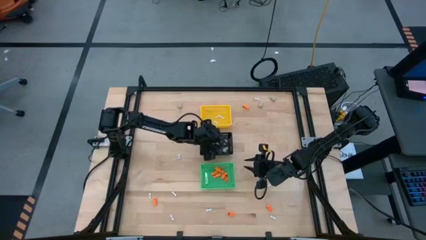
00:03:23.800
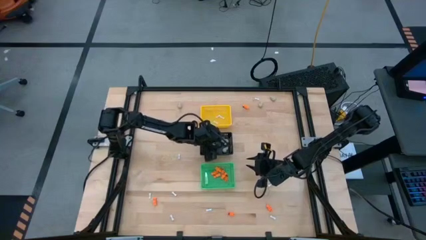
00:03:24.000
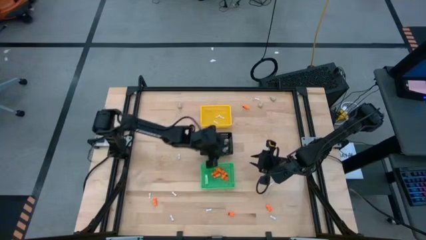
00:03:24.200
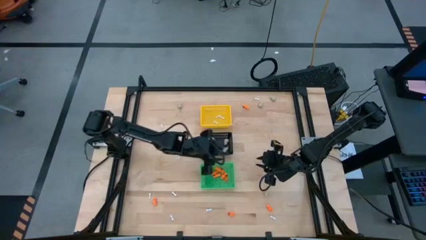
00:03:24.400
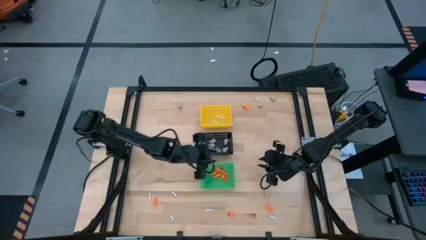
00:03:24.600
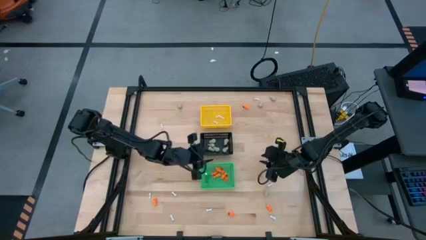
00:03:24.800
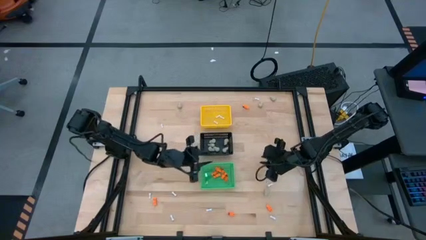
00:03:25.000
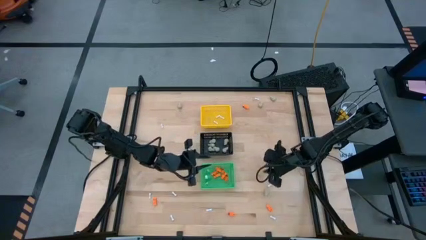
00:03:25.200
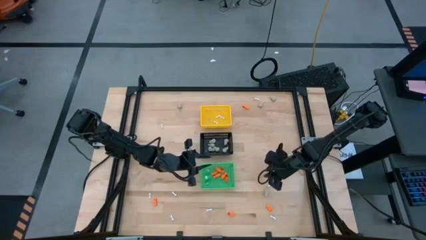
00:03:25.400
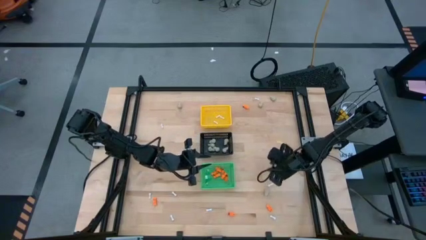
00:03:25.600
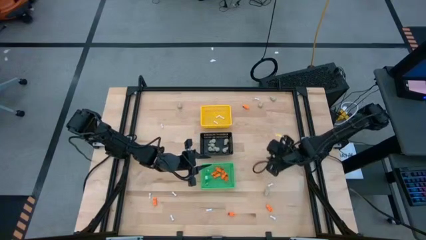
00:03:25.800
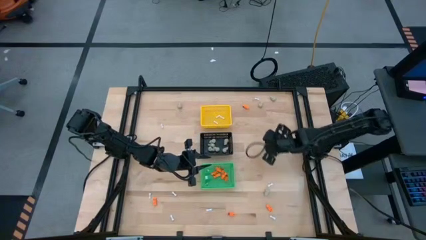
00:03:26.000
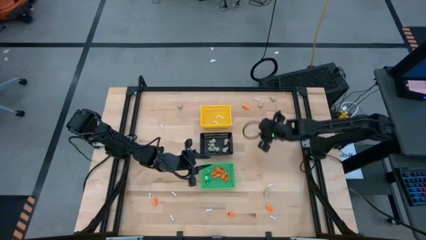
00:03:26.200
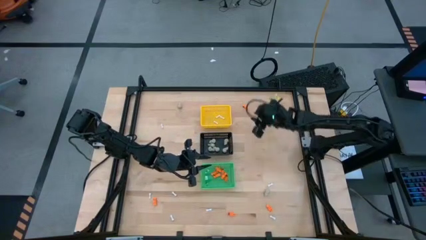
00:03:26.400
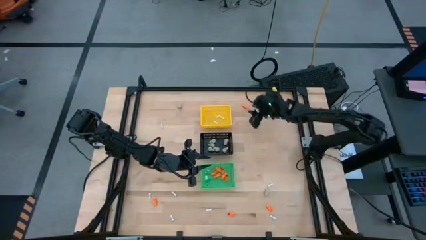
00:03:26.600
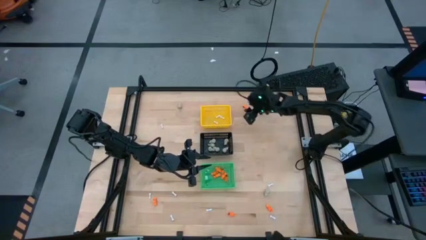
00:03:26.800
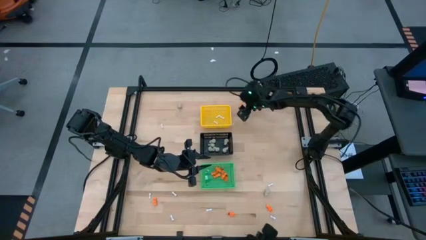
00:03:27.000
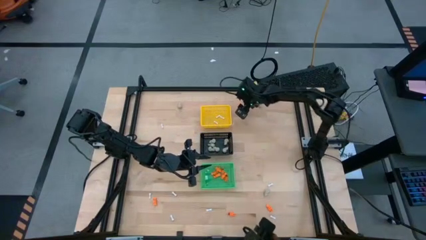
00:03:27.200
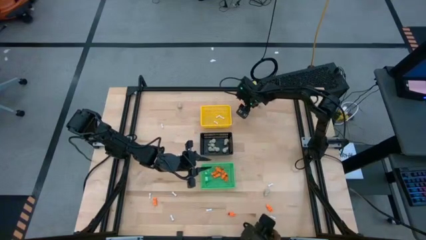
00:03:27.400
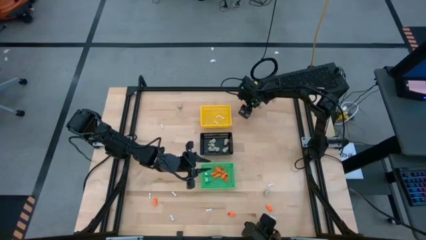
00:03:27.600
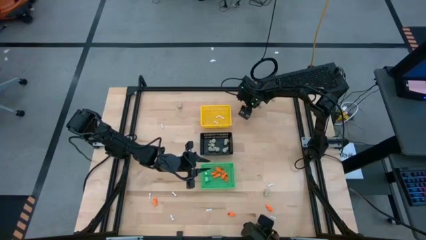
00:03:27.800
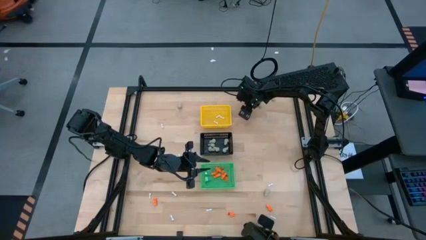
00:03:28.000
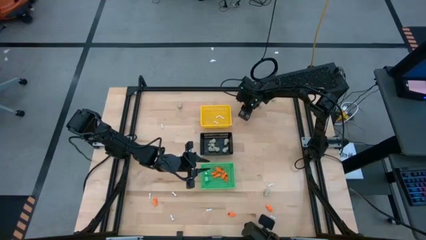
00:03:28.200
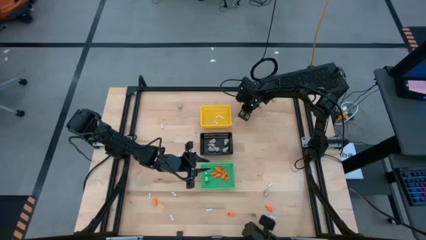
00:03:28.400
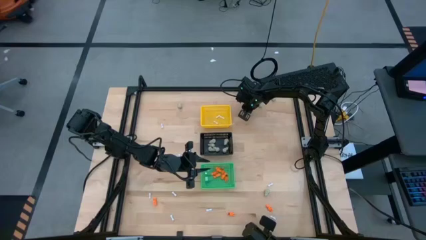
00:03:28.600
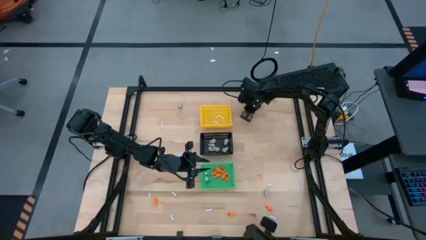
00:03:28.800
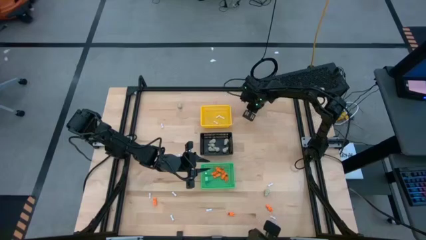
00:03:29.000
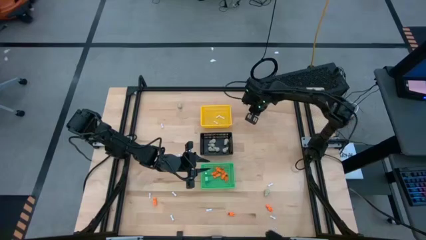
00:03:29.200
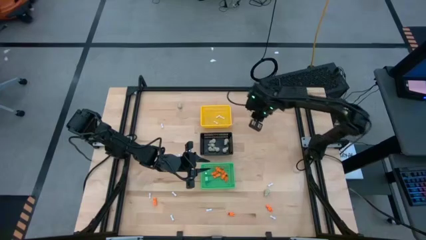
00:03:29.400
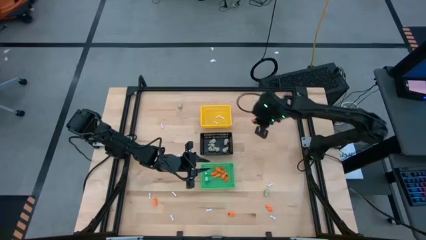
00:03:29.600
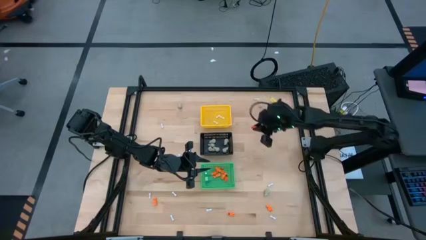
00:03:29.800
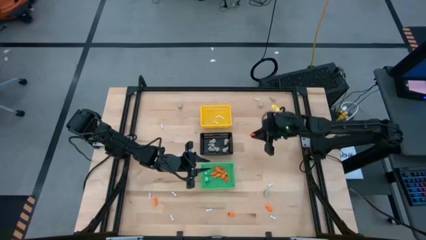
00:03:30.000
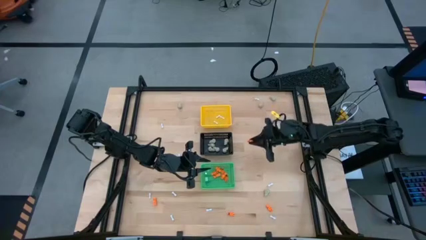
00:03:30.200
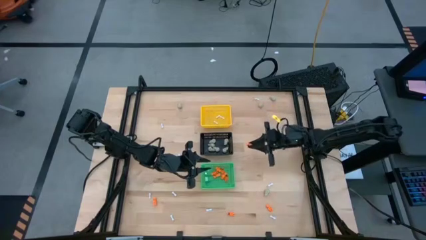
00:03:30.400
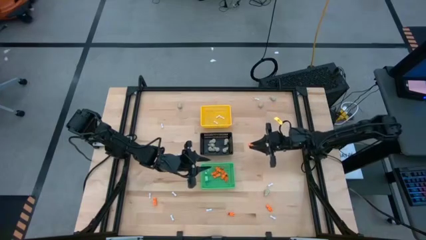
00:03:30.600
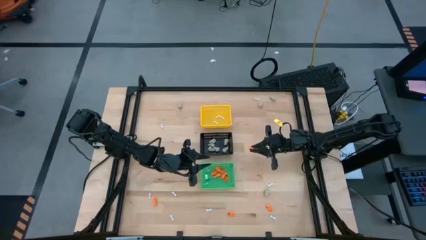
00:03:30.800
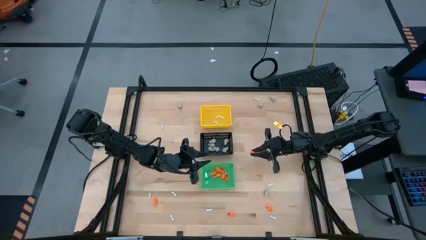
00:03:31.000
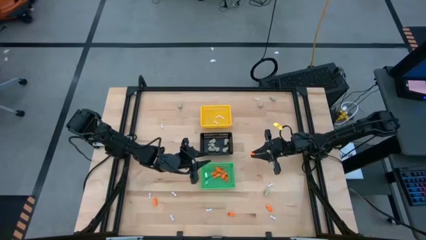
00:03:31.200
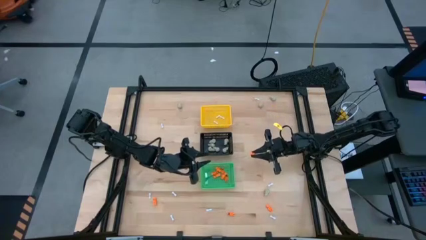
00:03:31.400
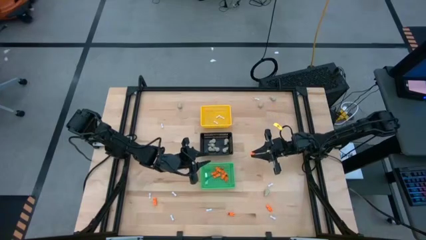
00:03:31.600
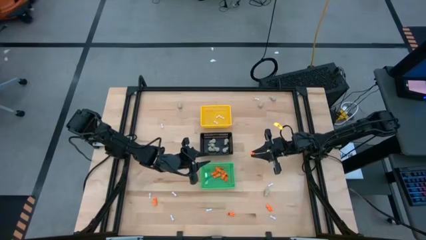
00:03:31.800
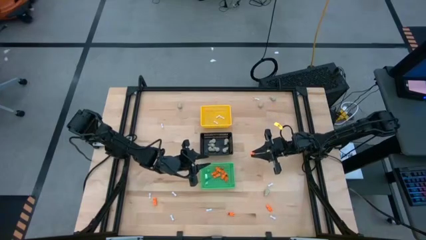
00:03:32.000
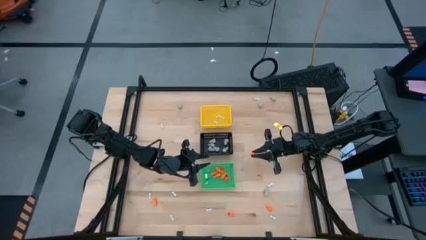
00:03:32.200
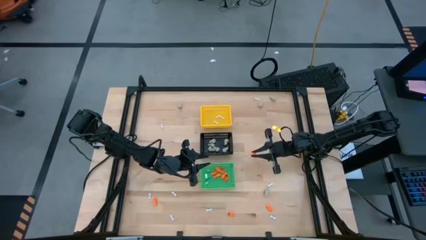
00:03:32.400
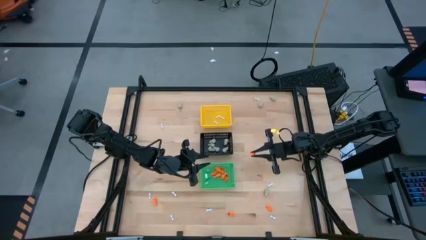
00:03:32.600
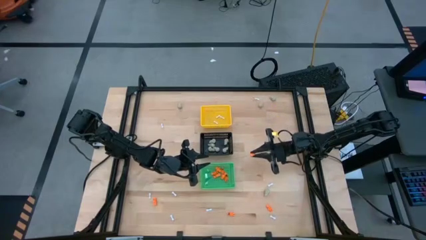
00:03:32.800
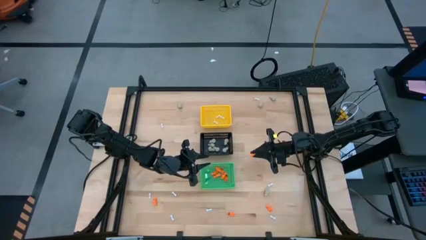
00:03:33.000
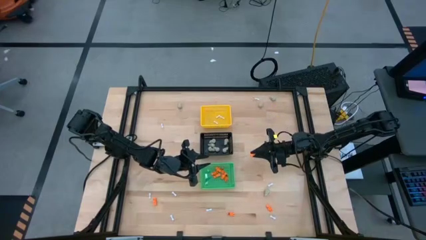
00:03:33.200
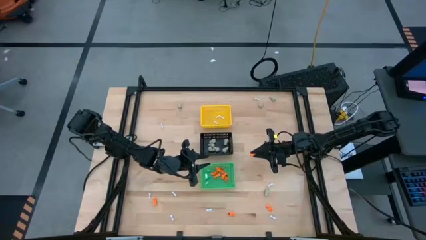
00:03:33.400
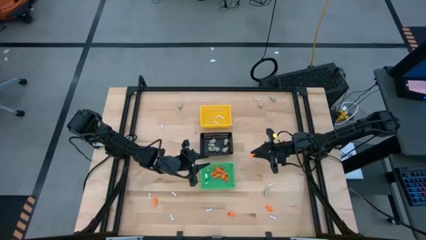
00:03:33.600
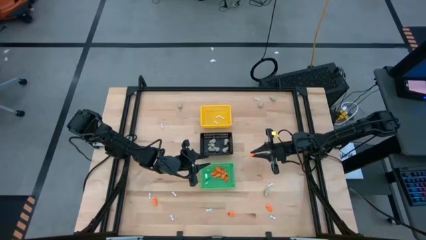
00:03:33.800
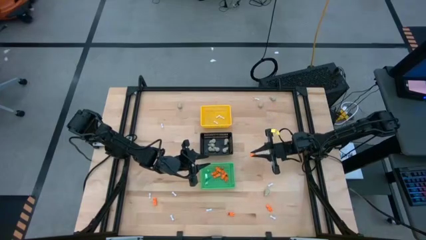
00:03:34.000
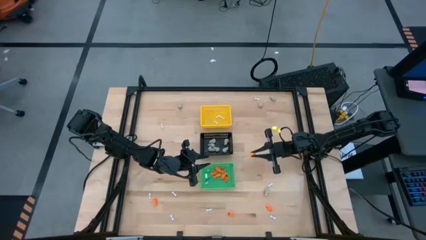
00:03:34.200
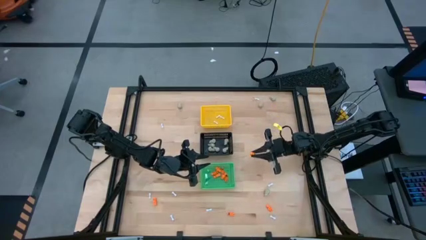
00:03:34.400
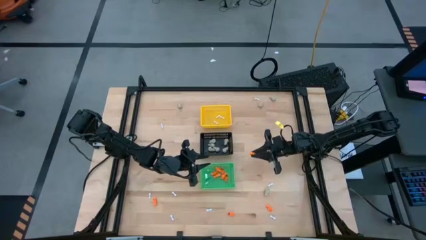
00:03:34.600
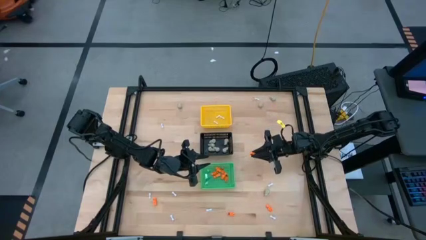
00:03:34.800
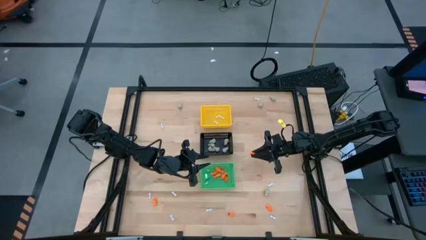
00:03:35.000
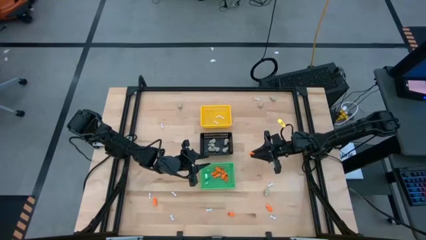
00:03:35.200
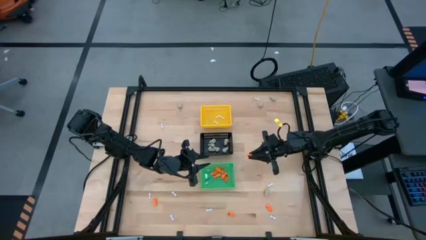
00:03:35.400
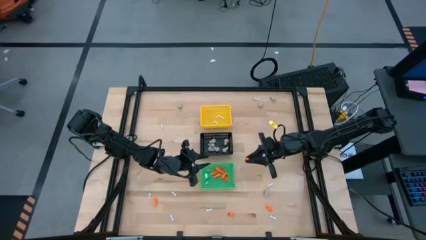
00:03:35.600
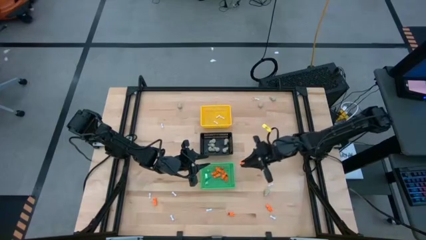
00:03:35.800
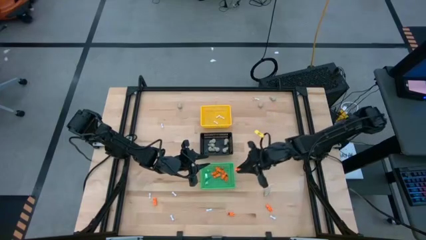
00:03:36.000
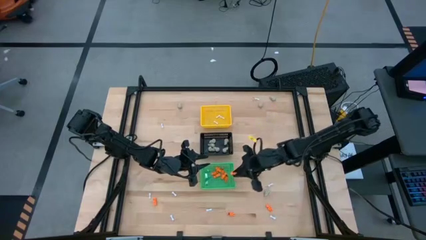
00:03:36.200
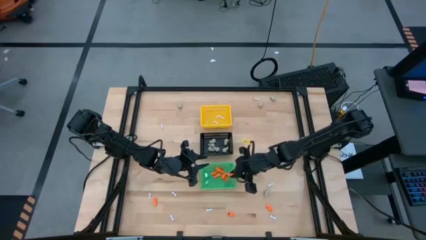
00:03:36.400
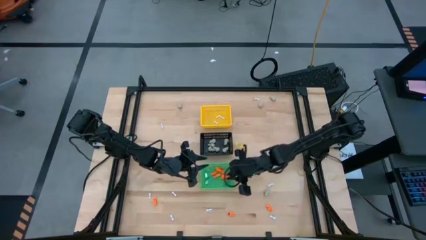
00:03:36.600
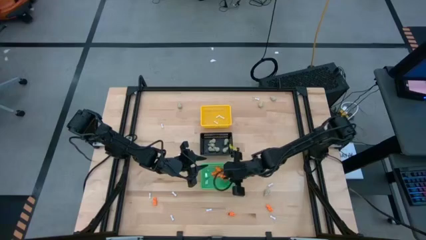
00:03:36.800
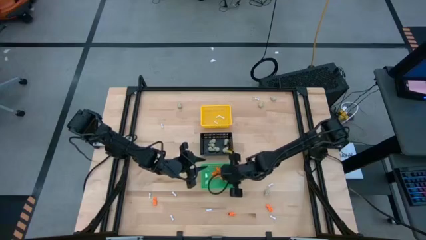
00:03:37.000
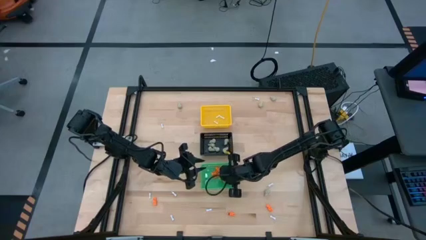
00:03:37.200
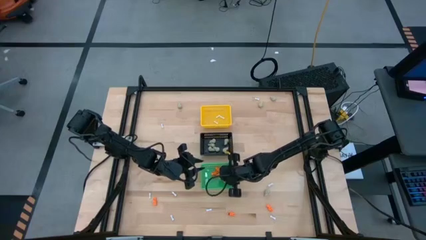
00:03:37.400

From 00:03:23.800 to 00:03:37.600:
Task: Sort Halloween decoration
Put the orange skeleton toy into the green basket
